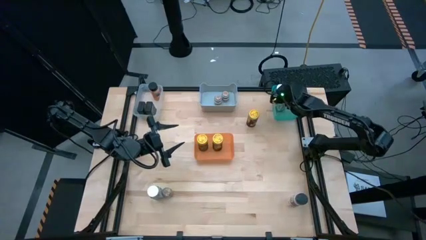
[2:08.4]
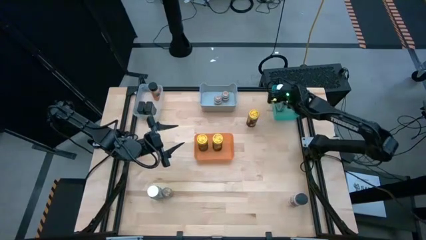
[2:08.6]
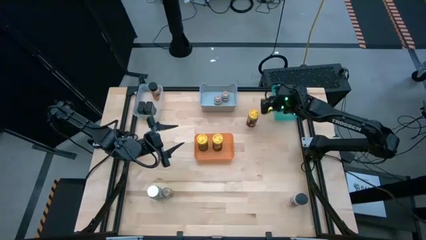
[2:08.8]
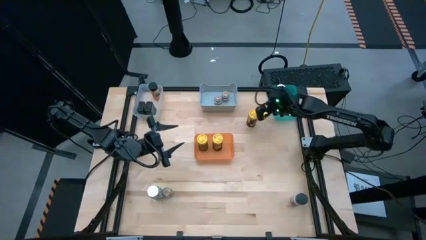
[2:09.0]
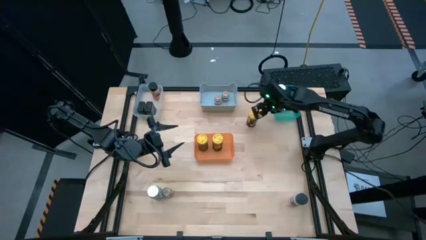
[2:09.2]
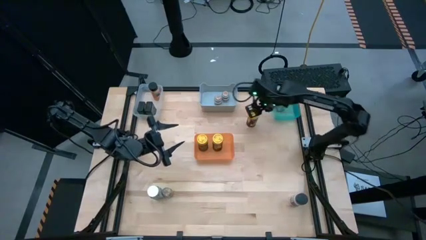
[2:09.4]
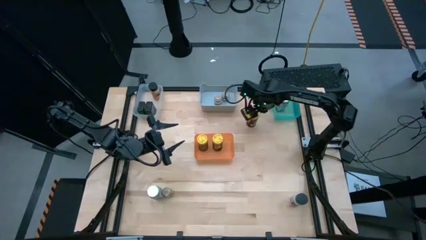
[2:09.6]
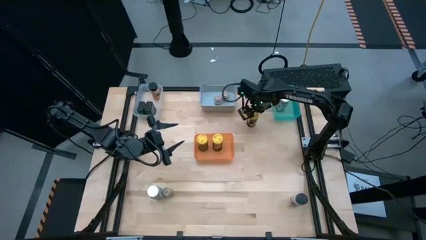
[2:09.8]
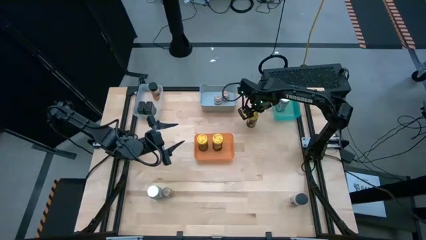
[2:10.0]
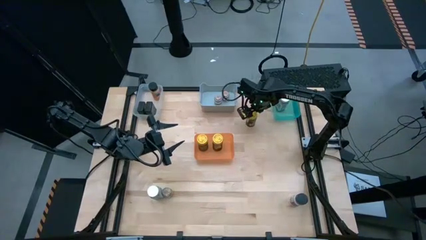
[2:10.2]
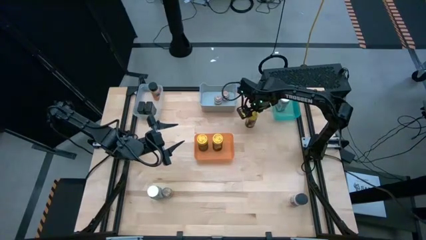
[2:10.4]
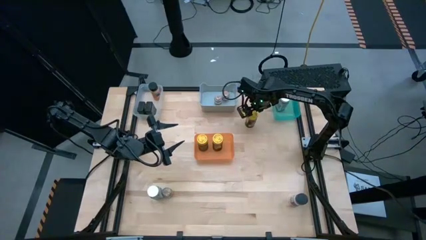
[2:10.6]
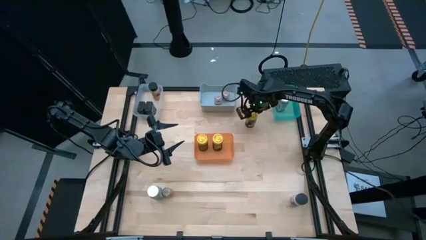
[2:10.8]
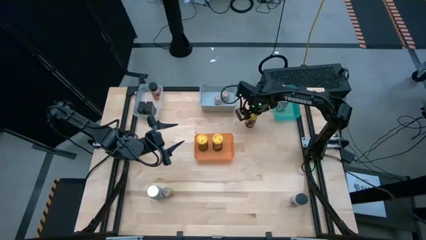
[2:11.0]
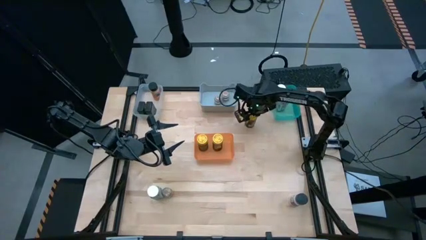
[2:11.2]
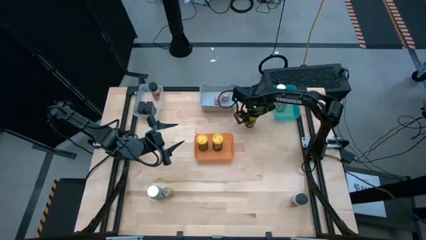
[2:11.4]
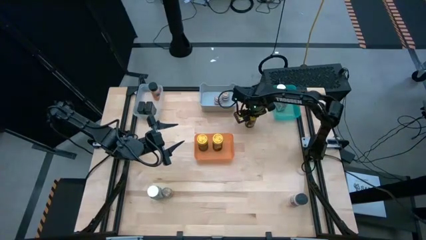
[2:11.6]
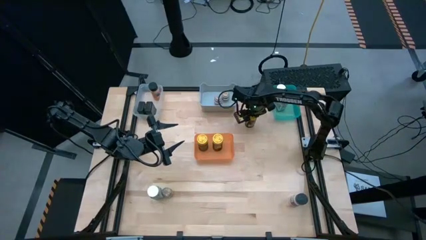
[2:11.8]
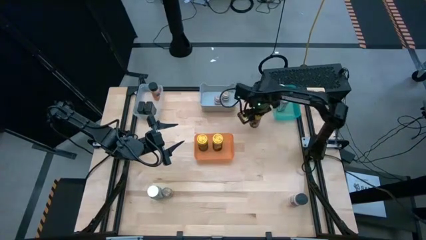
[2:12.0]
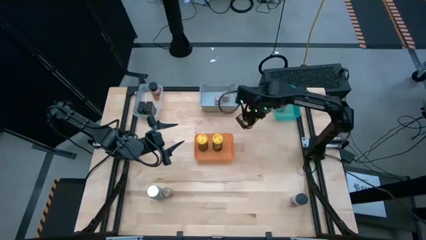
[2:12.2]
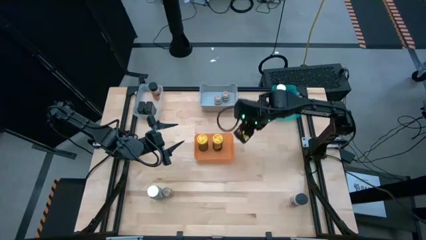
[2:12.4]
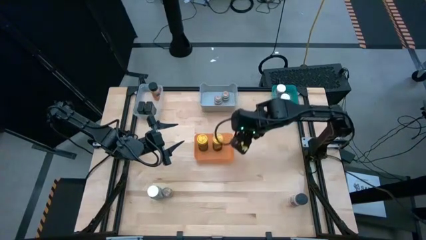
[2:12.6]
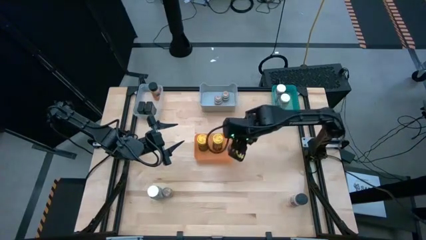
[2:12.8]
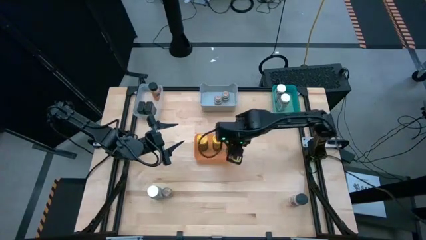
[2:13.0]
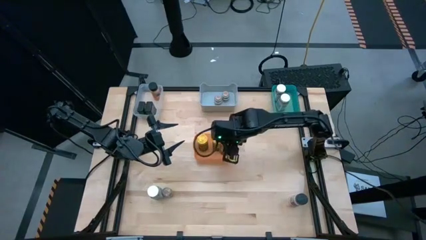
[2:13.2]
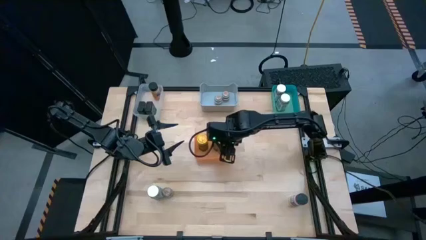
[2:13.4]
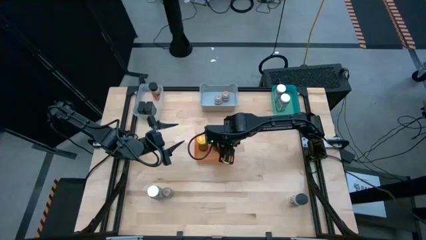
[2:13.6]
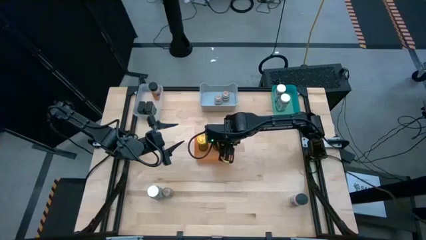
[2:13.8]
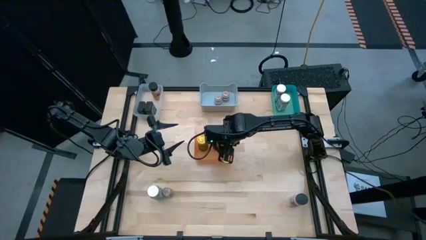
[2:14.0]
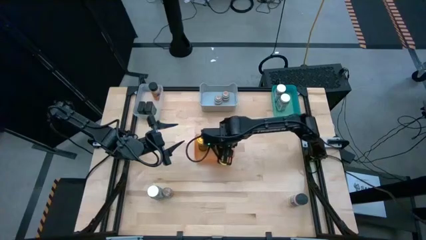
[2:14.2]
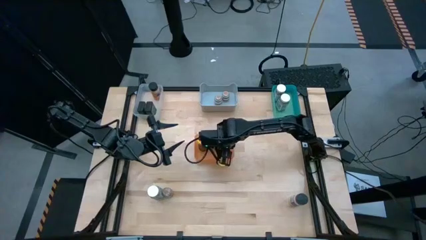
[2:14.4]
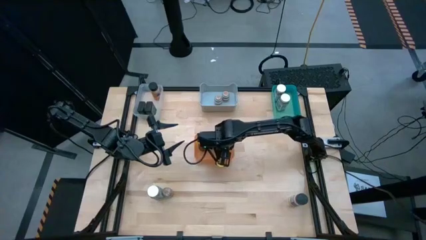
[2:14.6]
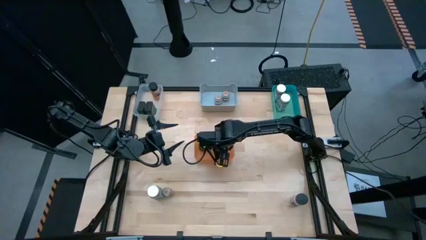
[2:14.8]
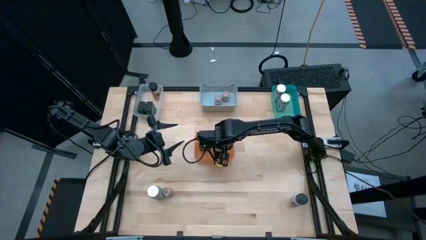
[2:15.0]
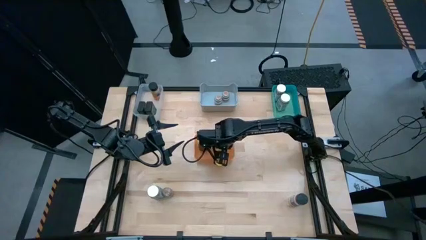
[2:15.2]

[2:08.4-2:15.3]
Task: Sort spices by type
Put the yellow seasoning bottle into the orange bin

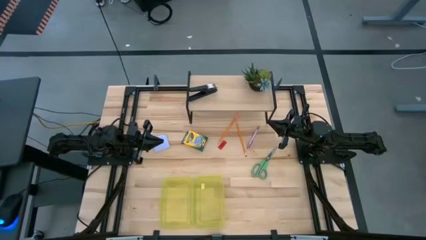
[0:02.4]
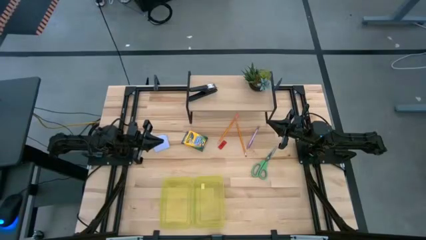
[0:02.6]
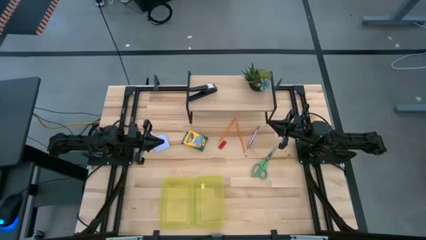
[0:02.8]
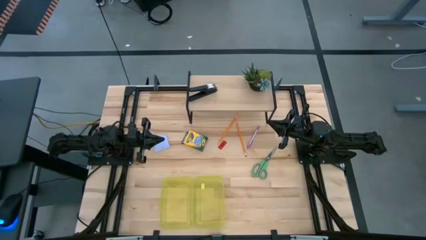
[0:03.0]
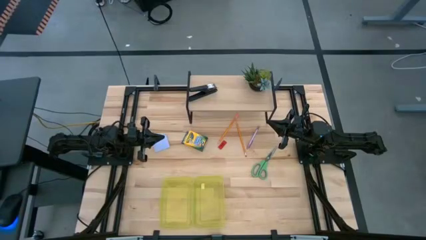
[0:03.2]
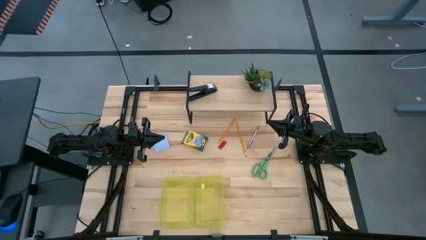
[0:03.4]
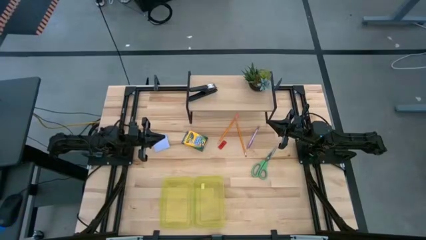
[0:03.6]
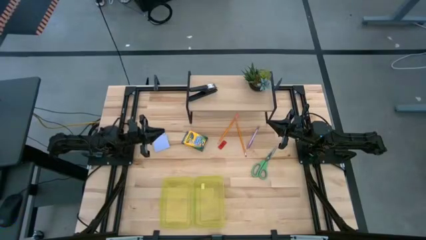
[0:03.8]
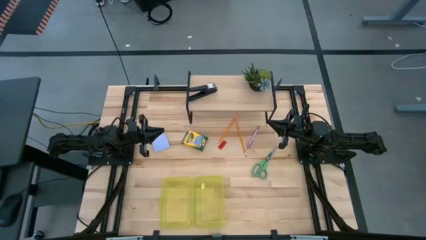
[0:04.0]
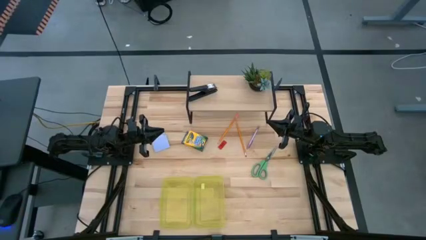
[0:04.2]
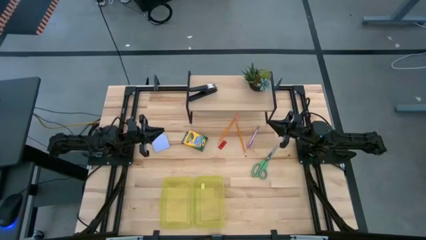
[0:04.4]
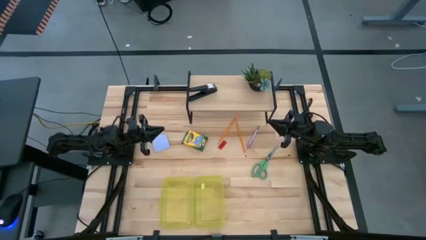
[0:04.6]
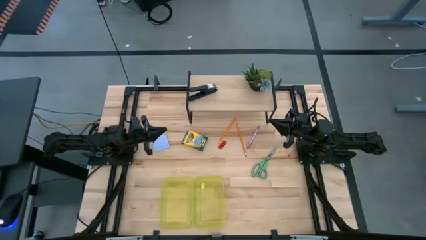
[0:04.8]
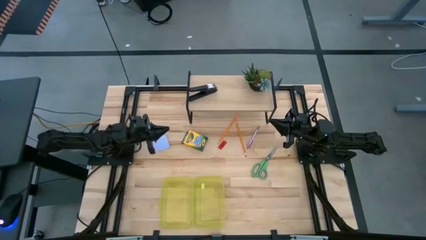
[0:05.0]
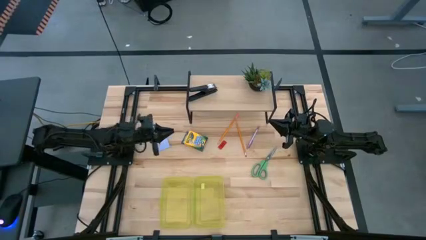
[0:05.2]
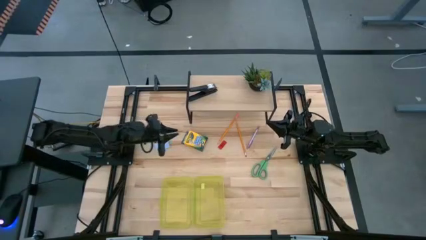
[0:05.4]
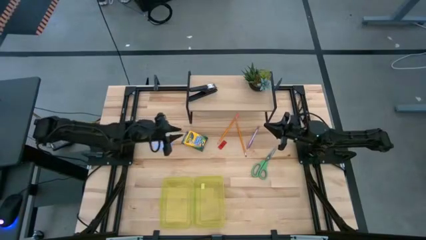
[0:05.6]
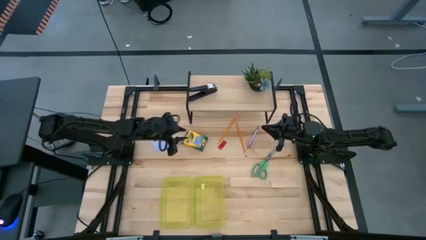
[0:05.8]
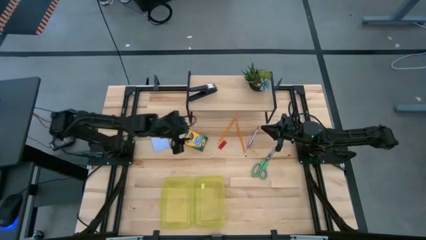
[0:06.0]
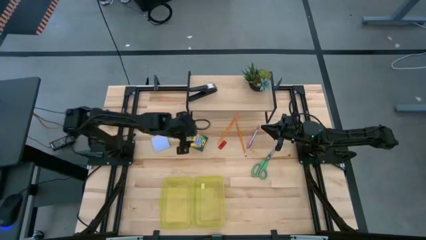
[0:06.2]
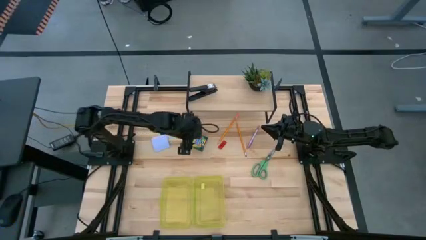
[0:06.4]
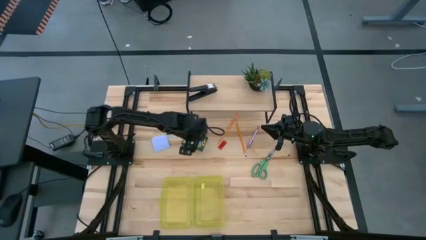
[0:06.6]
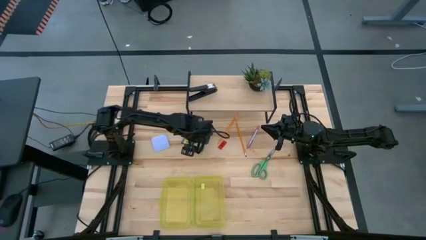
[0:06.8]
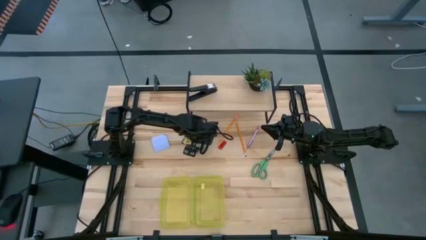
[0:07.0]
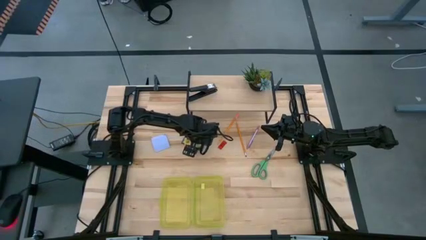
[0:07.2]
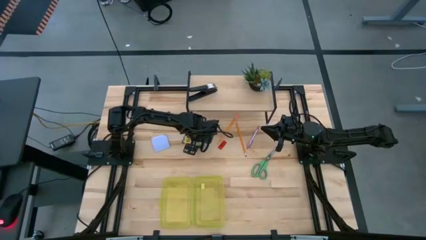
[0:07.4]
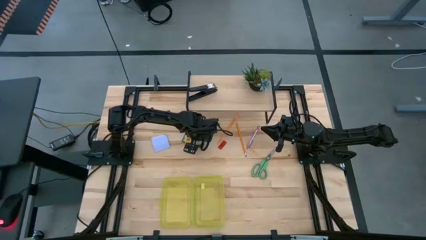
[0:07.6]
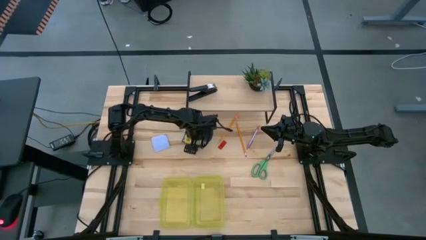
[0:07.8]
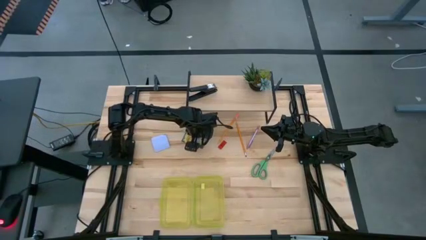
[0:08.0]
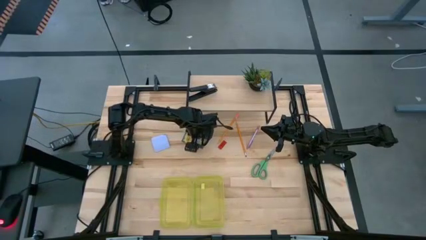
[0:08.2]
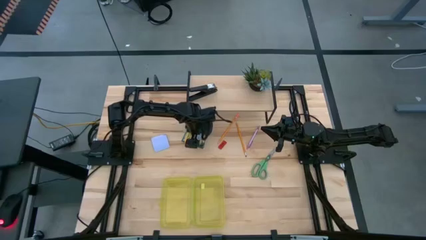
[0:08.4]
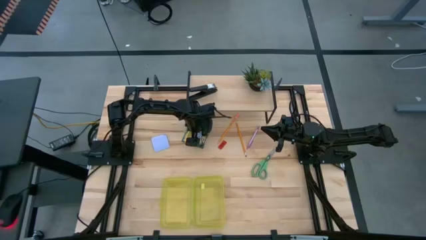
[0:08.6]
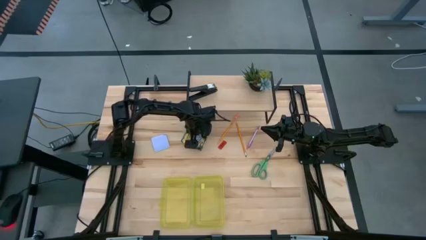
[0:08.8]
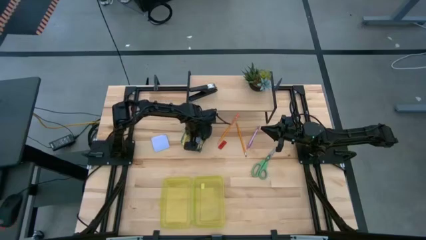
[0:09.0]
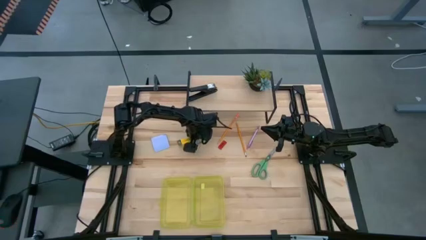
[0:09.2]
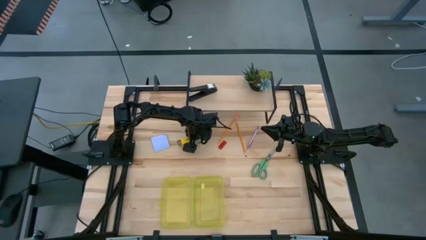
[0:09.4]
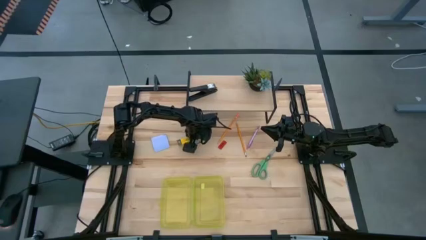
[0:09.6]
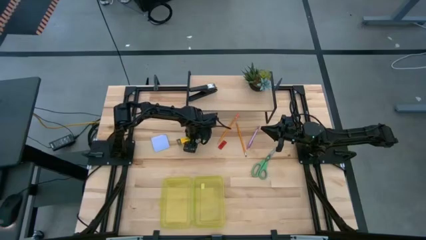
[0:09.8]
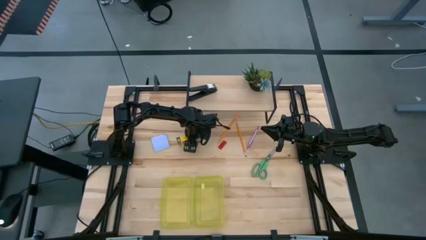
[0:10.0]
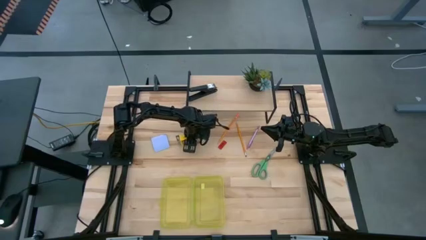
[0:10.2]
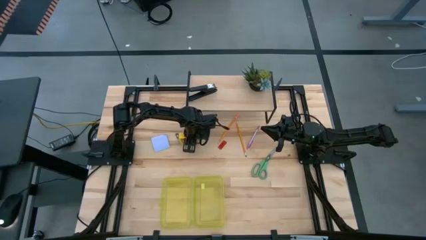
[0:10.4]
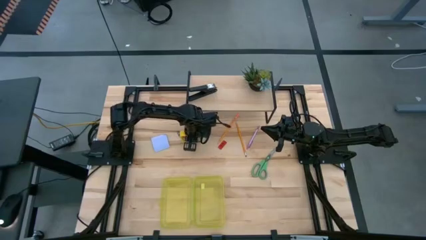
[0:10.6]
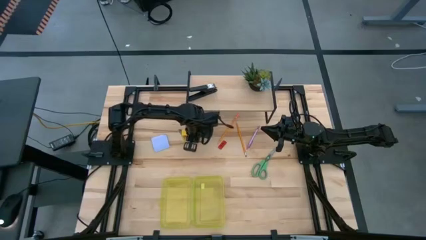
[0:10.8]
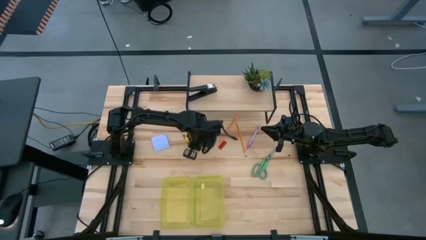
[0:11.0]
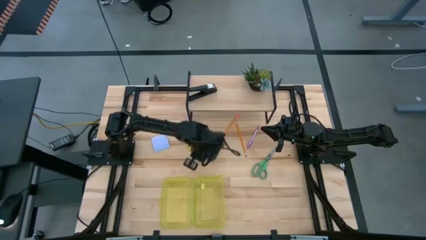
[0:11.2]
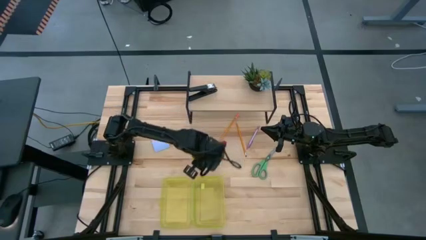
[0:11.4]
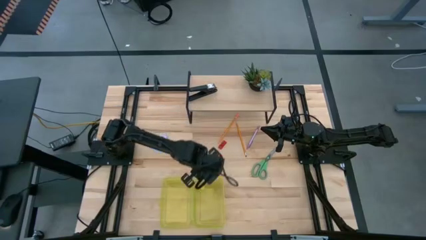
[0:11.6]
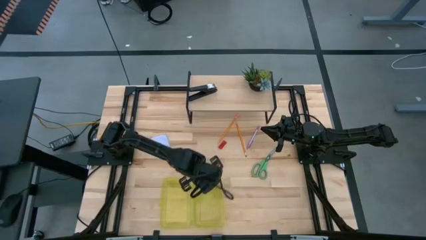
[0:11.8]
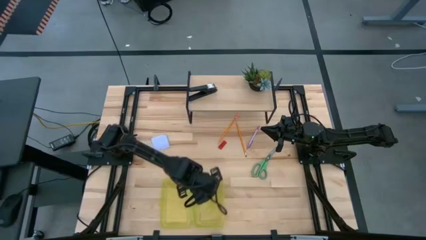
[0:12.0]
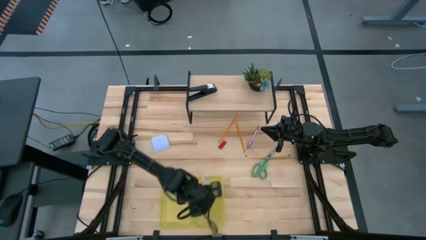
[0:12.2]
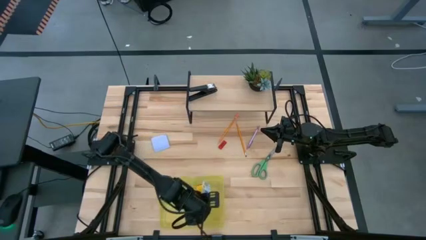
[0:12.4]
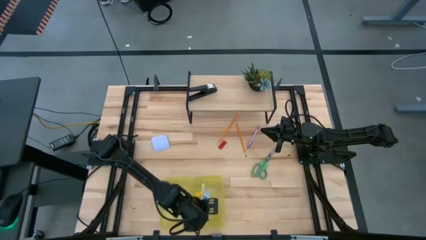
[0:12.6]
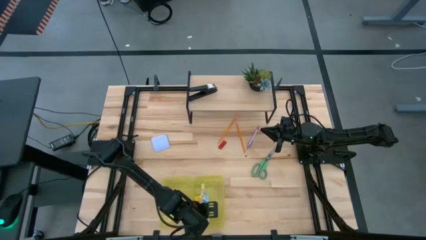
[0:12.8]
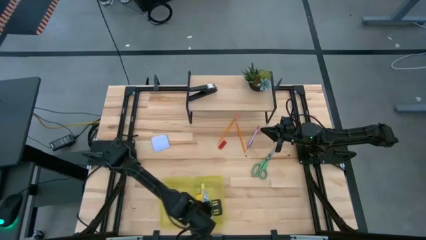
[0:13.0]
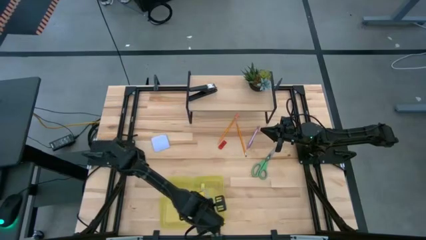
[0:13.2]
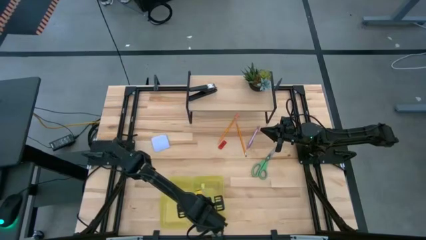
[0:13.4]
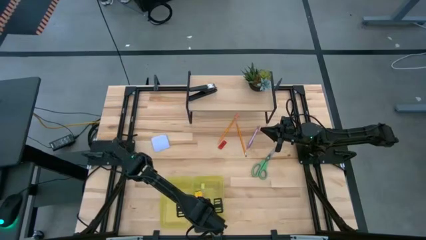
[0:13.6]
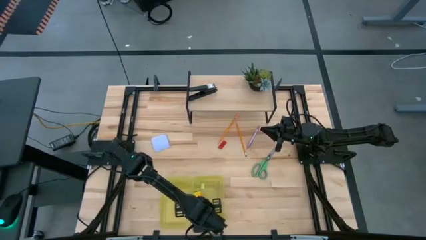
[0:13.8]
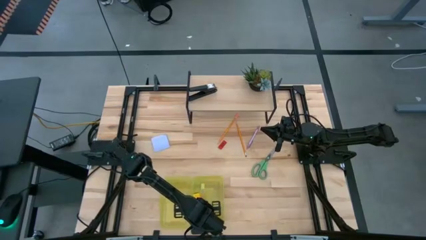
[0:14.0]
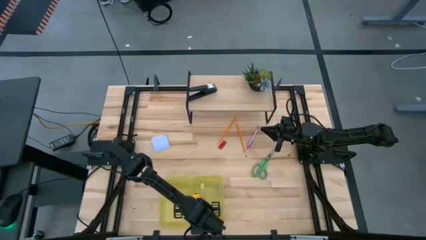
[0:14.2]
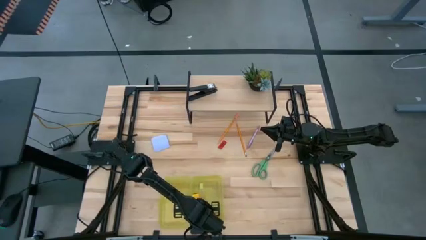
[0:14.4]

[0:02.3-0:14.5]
Task: Pack school essentials
Put the yellow crayon box into the yellow supply box
